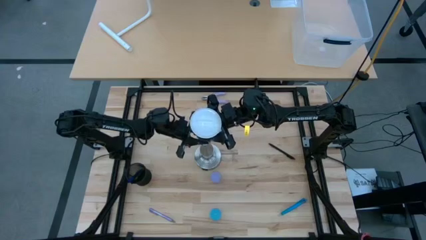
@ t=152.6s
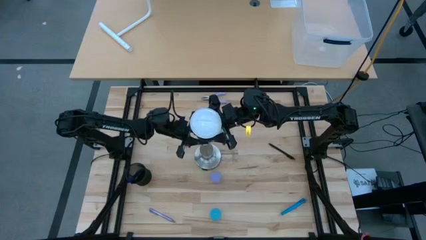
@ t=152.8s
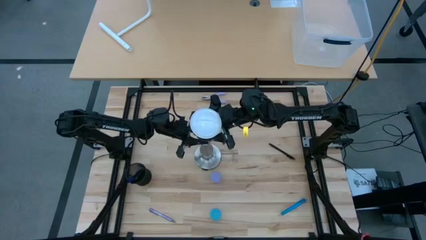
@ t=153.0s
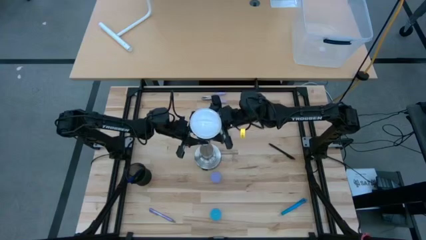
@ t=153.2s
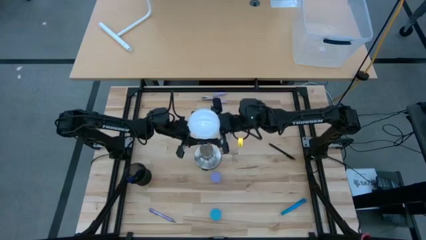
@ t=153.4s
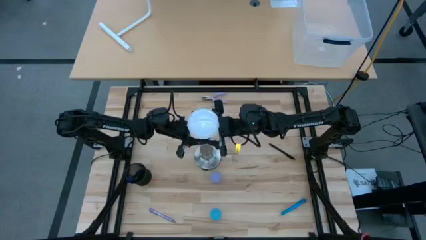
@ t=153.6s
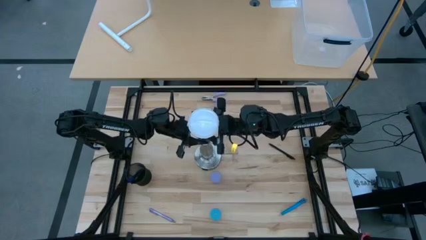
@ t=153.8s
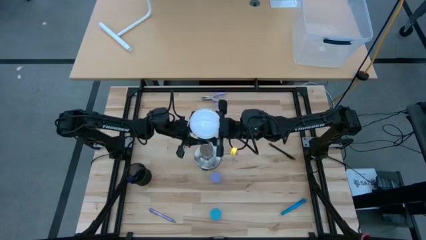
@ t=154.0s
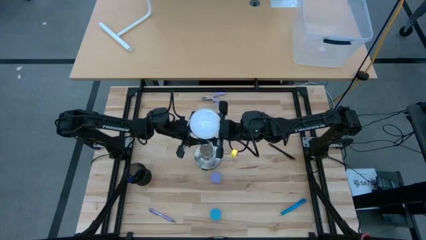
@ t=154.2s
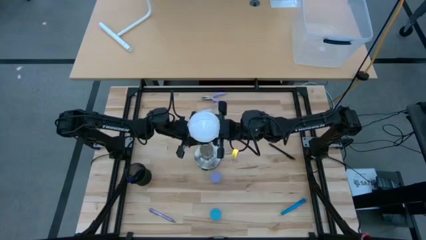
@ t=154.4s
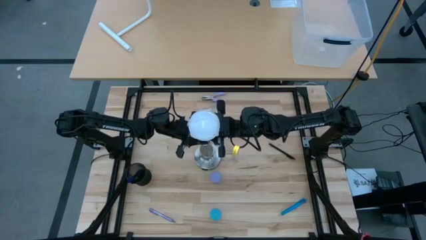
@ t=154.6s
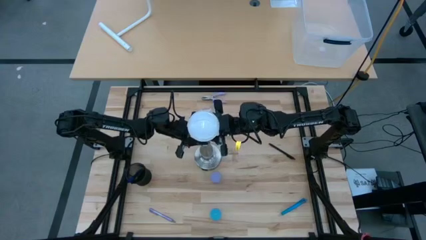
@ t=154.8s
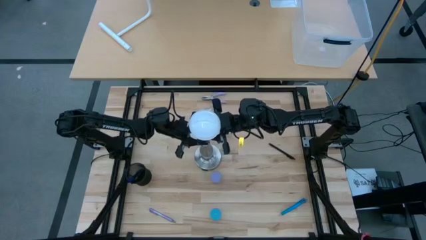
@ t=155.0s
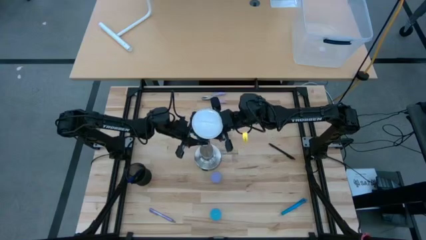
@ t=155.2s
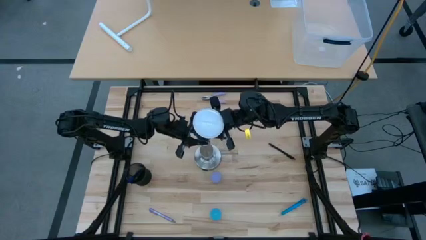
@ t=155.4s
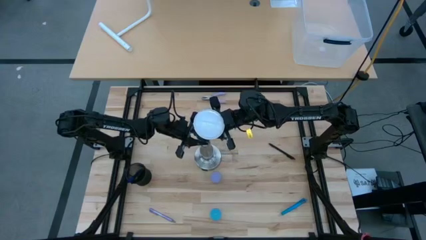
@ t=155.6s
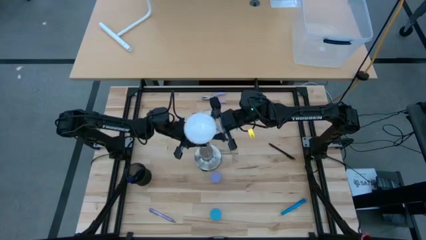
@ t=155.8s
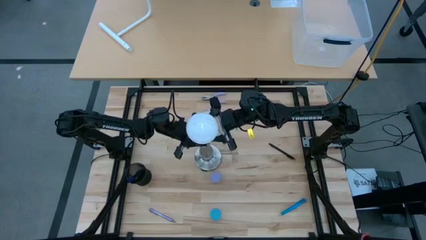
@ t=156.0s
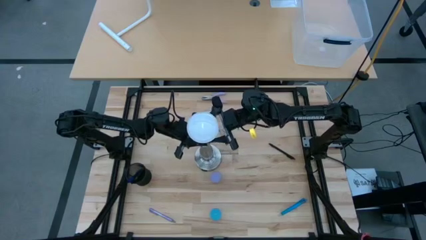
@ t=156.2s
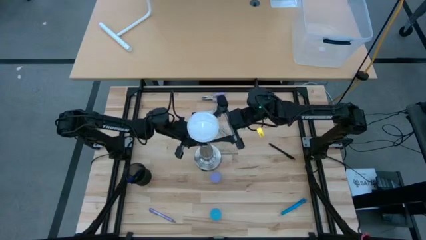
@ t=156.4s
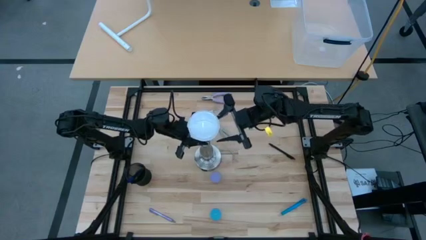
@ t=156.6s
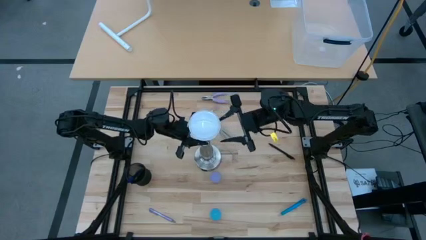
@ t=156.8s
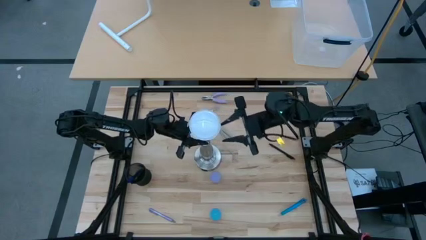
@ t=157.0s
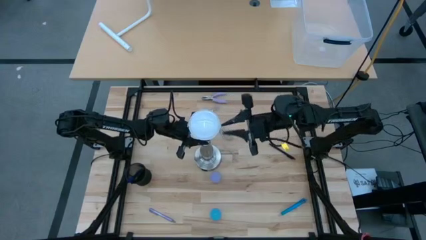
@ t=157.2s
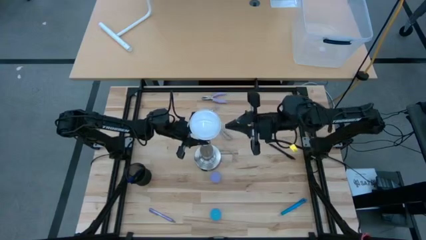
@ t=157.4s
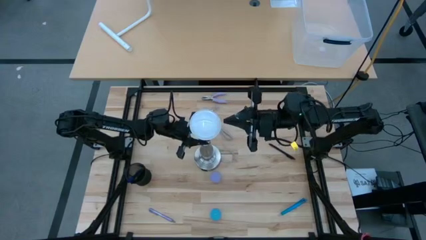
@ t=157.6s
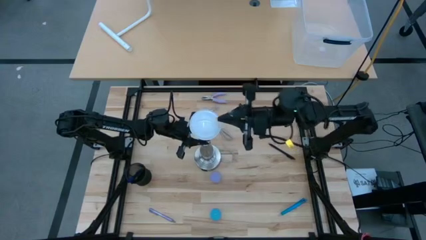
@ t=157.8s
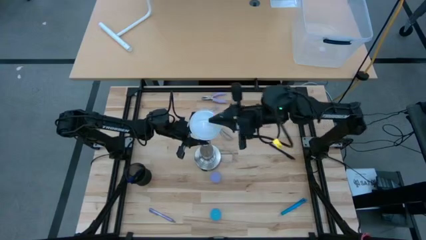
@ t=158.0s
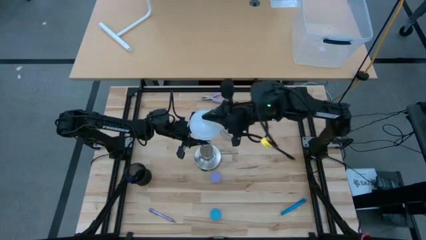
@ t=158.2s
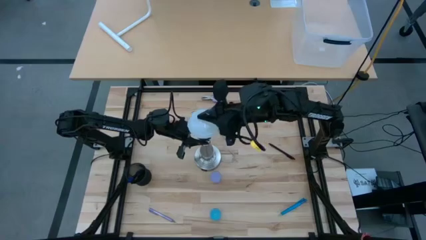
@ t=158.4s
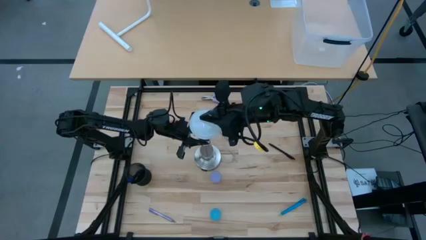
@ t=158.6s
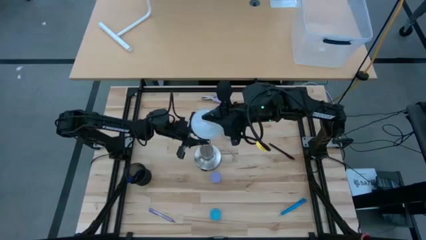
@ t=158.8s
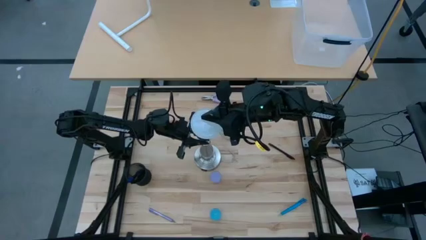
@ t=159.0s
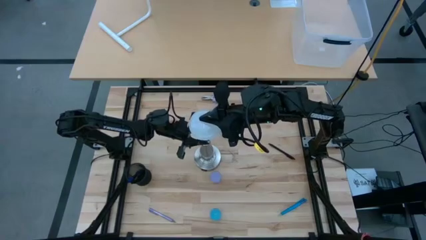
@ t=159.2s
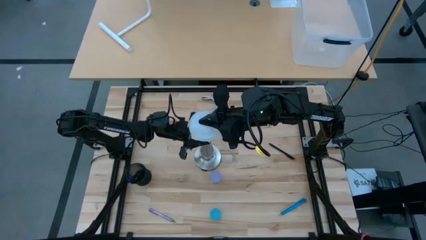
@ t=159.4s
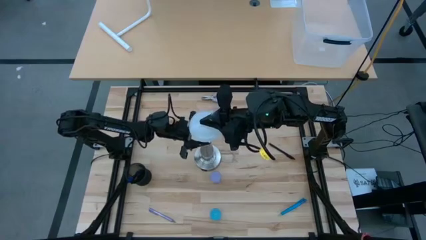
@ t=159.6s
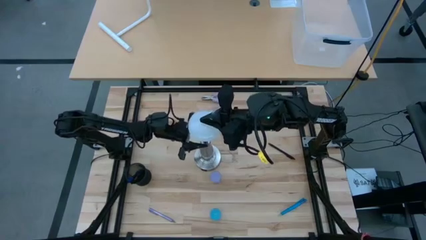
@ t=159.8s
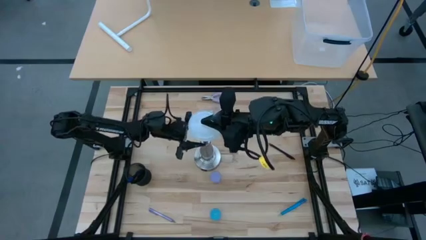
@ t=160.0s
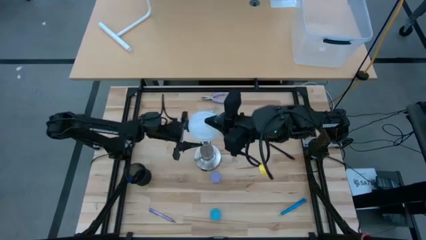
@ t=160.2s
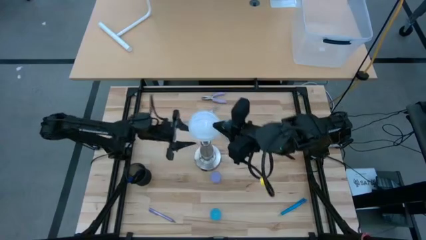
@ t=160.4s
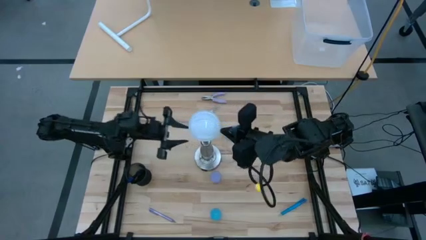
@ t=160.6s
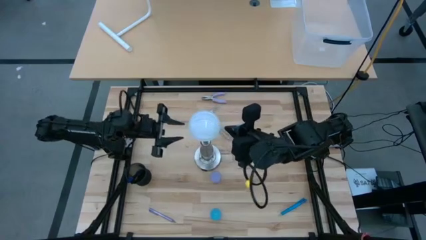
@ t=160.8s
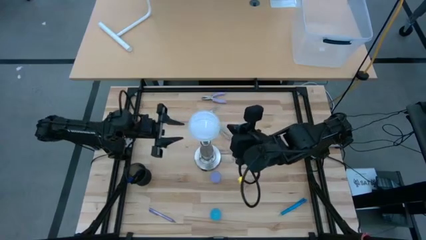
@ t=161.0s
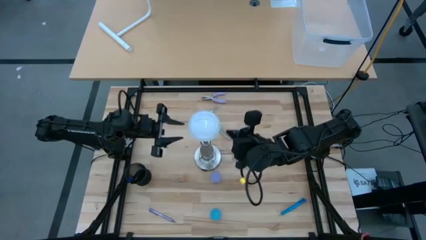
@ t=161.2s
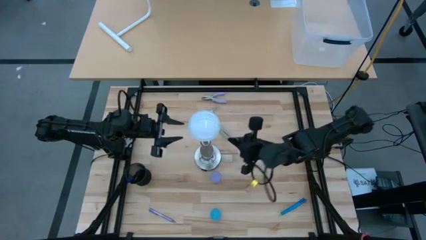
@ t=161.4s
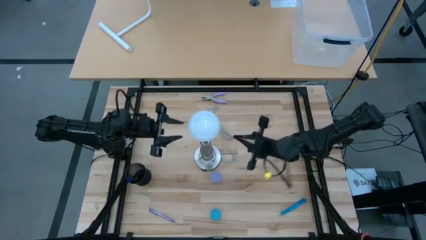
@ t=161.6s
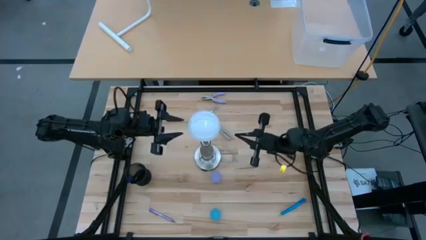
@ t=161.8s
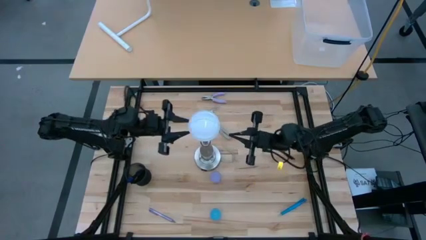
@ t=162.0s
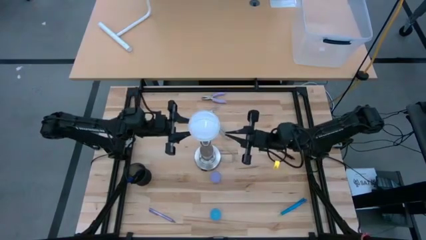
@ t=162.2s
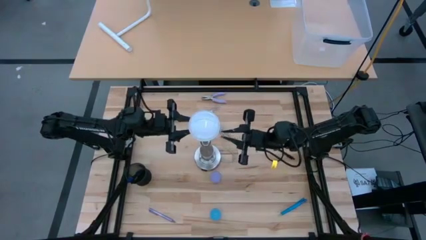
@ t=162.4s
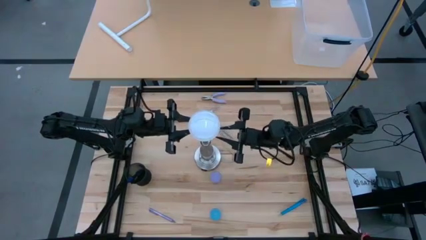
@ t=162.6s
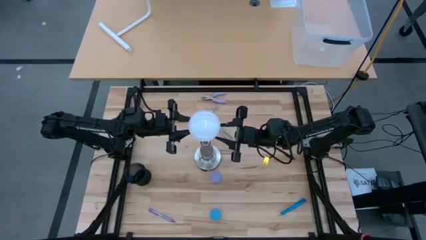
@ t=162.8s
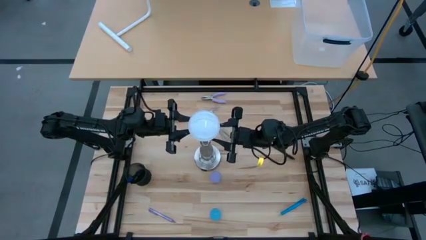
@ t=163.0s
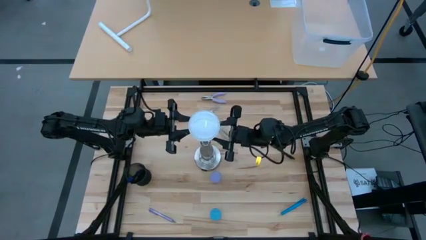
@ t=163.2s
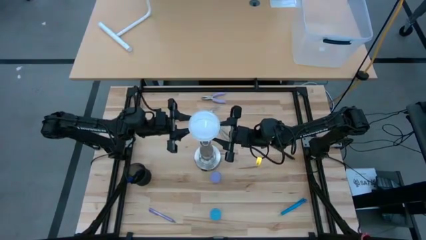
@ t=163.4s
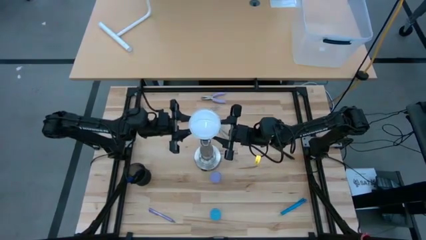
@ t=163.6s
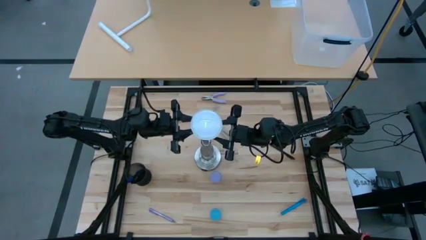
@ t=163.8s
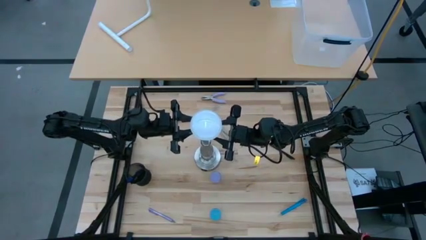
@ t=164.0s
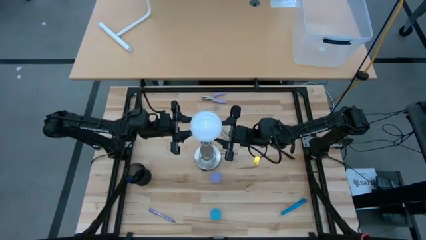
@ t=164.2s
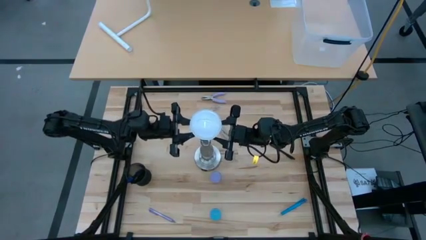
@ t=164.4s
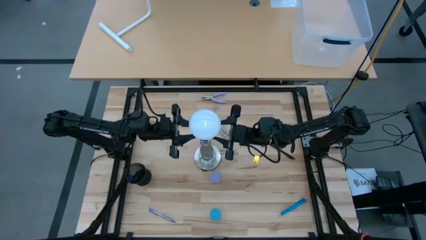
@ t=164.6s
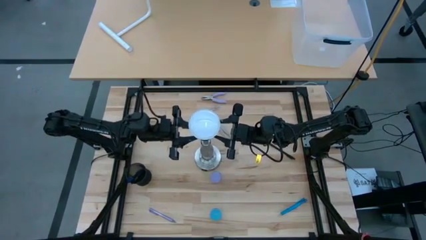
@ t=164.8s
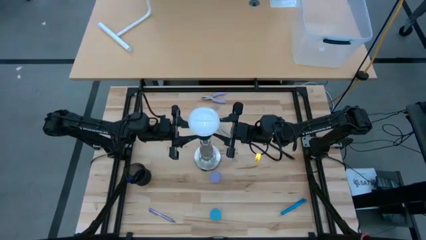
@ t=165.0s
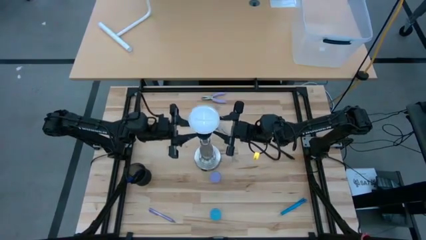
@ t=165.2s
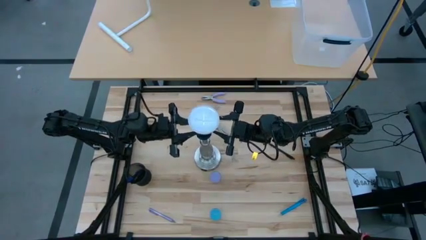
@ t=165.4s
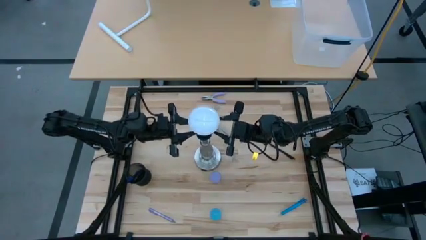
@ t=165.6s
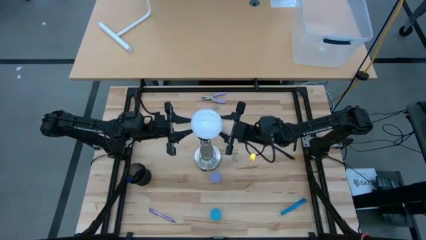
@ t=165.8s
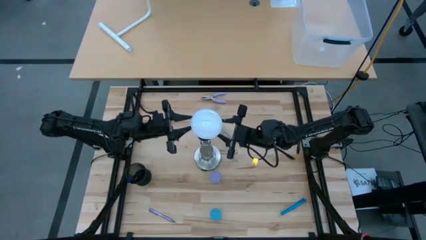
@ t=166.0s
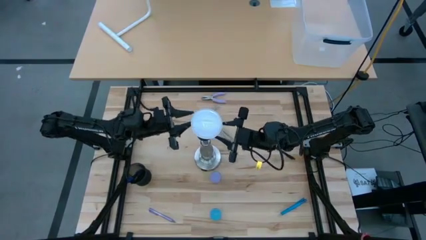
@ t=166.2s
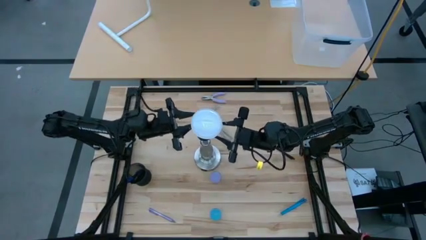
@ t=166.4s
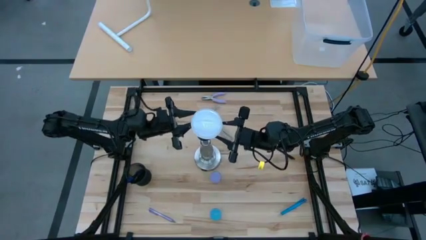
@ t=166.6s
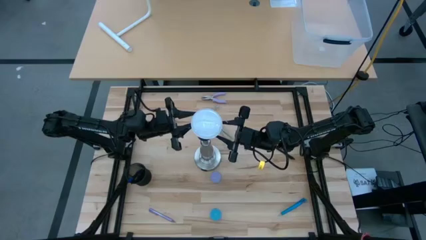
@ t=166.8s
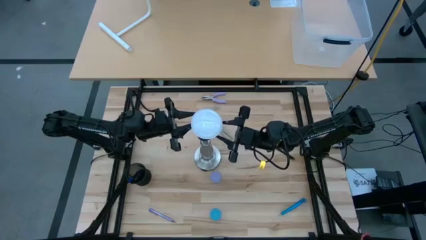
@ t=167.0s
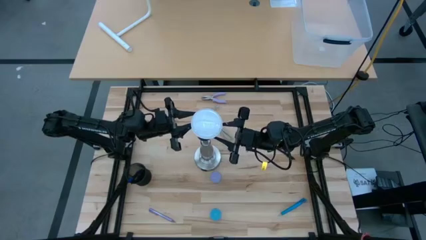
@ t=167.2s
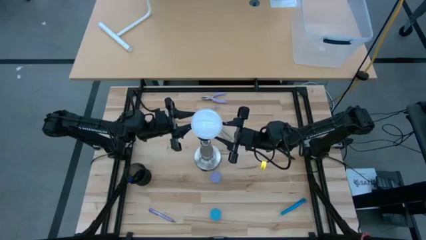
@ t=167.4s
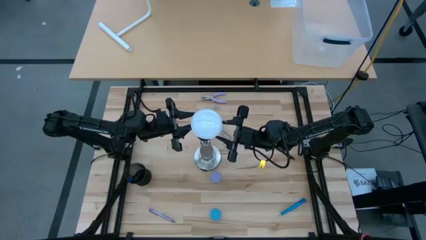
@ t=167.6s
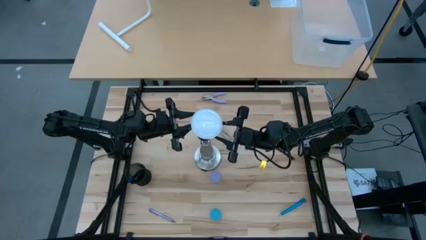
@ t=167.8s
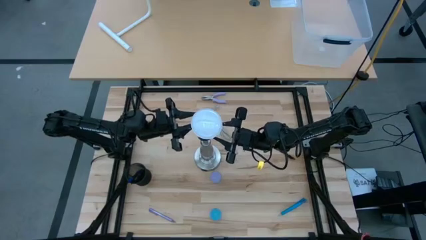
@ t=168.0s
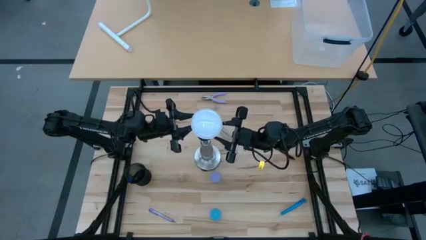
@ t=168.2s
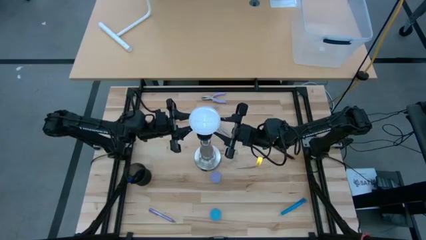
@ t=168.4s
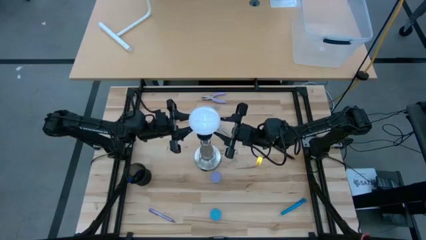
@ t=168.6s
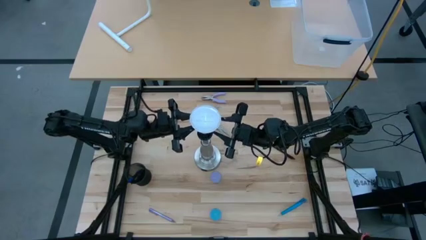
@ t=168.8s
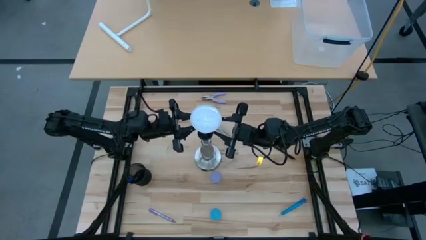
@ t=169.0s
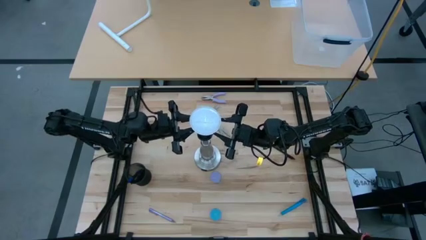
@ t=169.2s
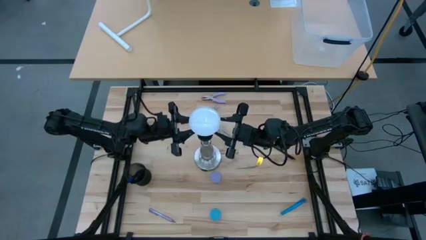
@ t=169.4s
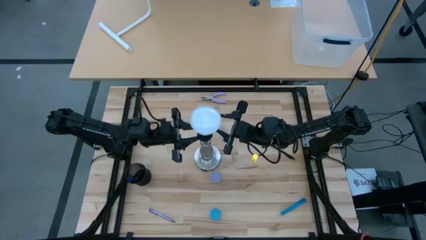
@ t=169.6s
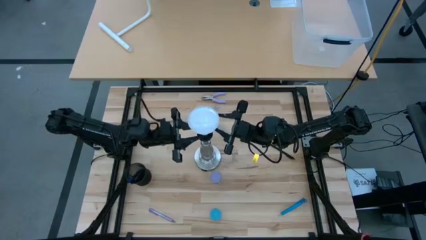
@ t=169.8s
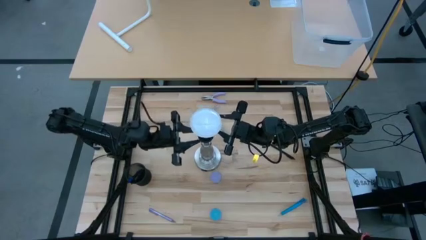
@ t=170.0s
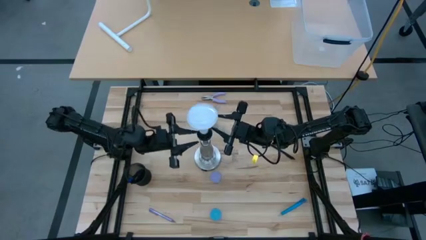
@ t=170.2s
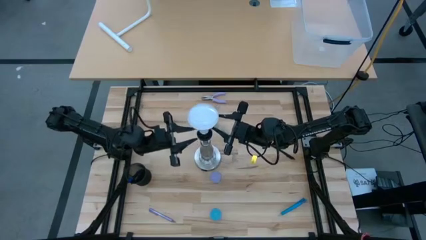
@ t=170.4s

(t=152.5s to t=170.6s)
Task: Screw lightbulb
Remove the lightbulb from the silver lamp socket
